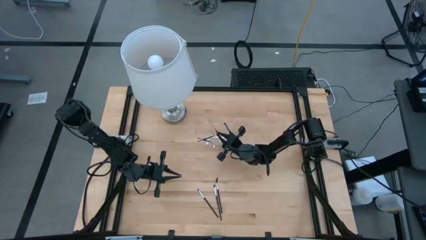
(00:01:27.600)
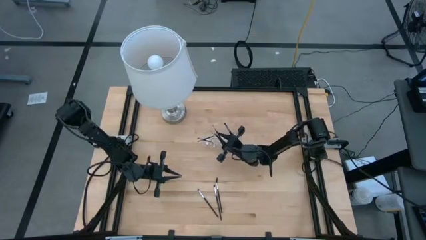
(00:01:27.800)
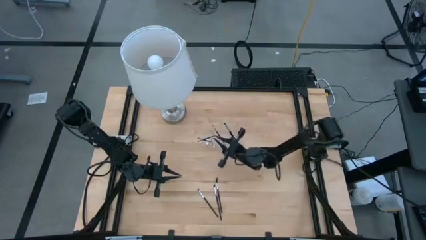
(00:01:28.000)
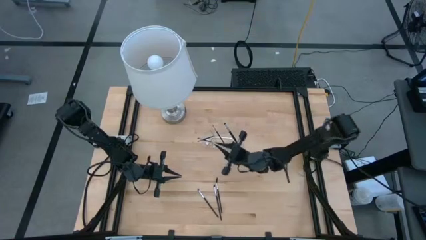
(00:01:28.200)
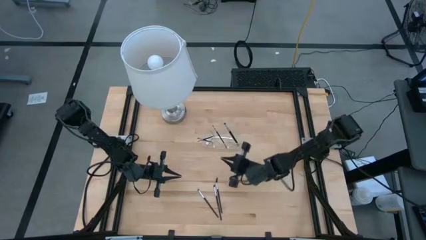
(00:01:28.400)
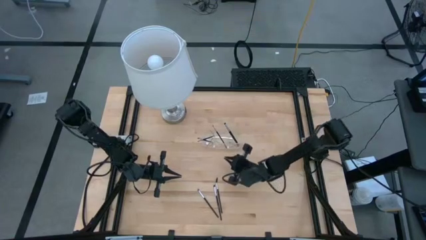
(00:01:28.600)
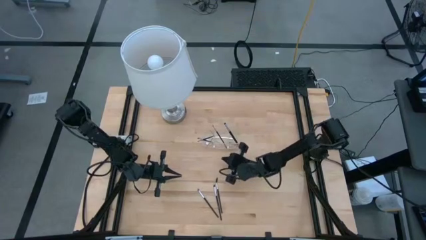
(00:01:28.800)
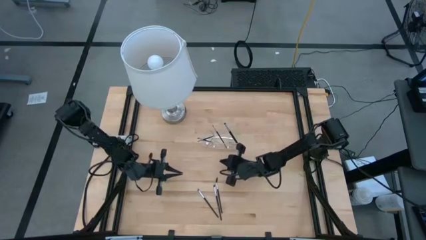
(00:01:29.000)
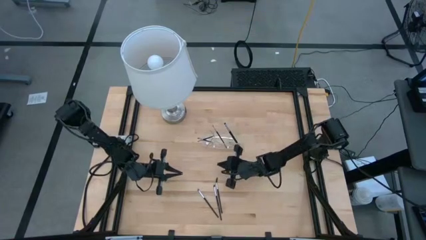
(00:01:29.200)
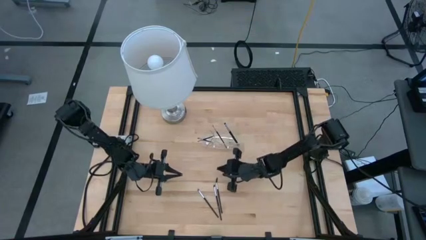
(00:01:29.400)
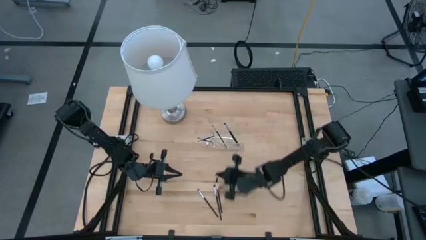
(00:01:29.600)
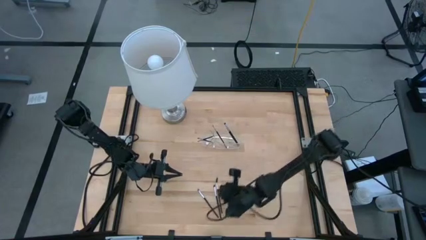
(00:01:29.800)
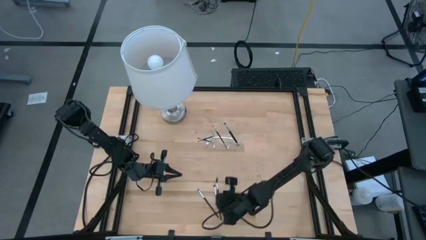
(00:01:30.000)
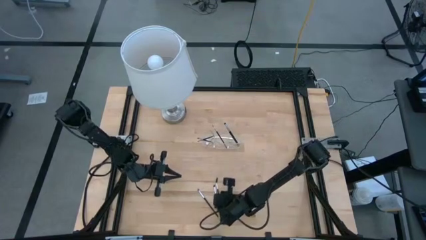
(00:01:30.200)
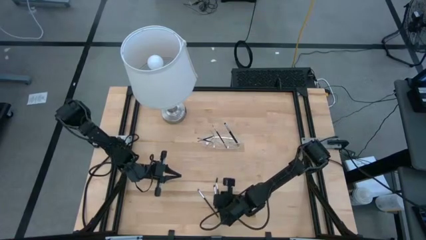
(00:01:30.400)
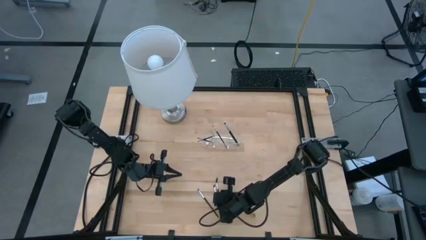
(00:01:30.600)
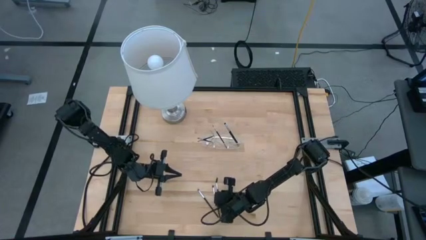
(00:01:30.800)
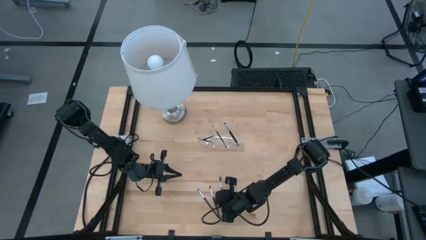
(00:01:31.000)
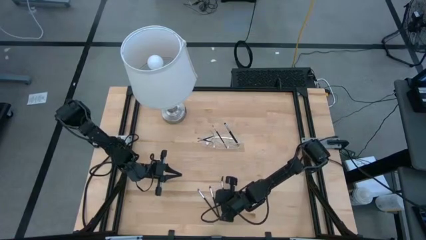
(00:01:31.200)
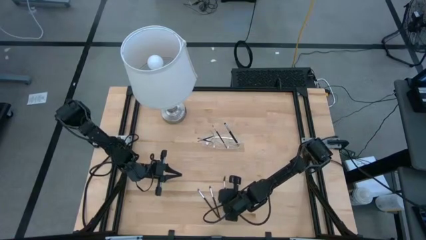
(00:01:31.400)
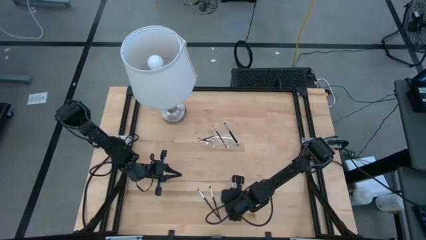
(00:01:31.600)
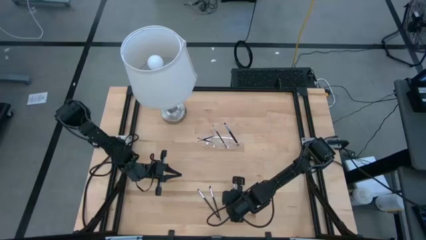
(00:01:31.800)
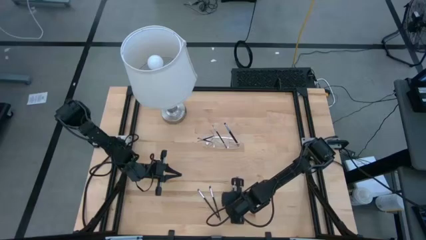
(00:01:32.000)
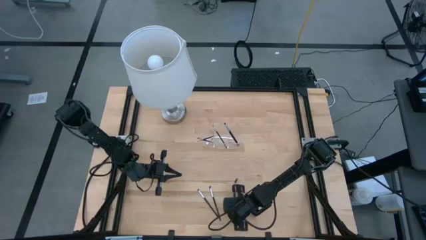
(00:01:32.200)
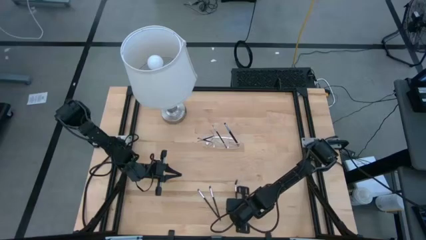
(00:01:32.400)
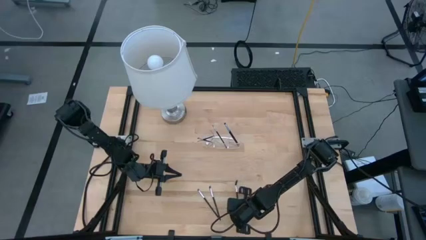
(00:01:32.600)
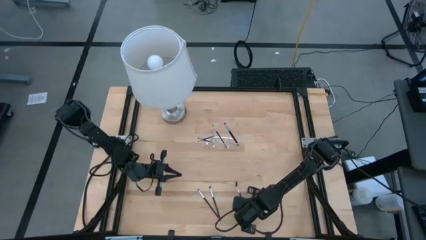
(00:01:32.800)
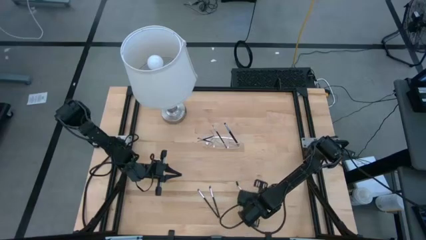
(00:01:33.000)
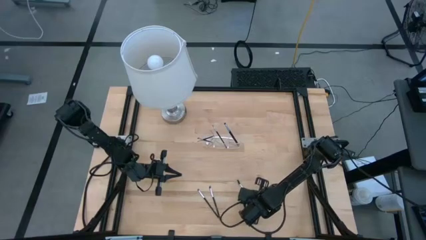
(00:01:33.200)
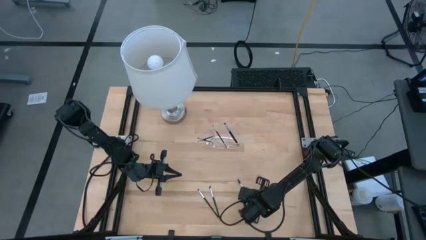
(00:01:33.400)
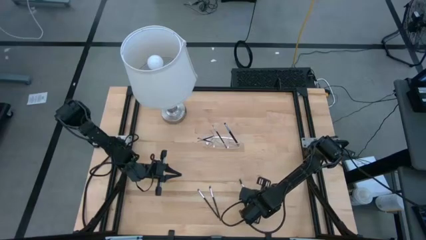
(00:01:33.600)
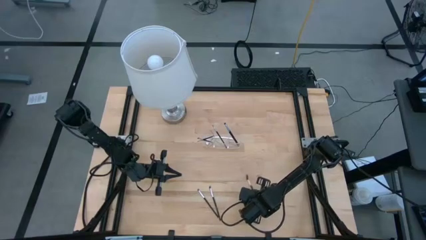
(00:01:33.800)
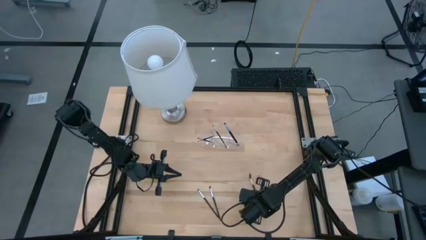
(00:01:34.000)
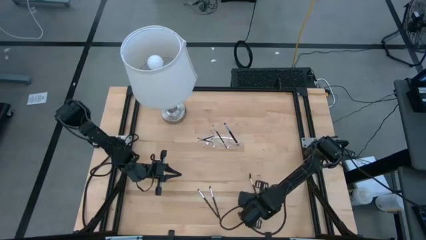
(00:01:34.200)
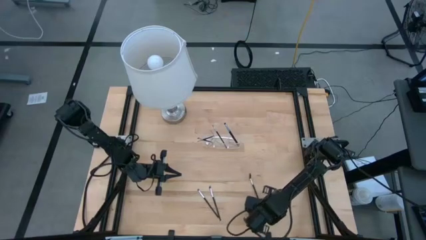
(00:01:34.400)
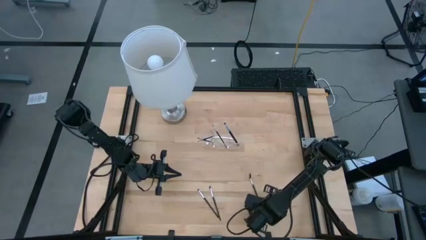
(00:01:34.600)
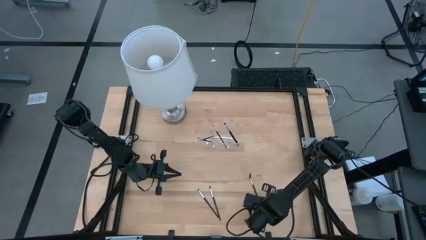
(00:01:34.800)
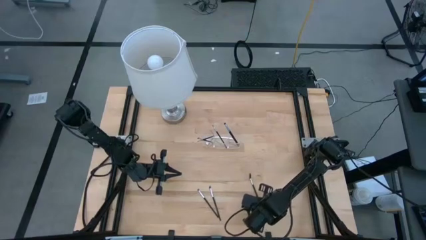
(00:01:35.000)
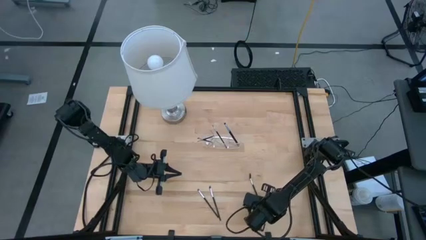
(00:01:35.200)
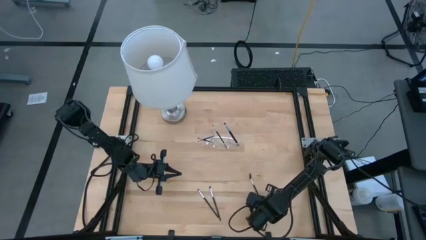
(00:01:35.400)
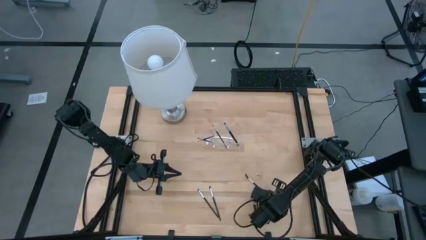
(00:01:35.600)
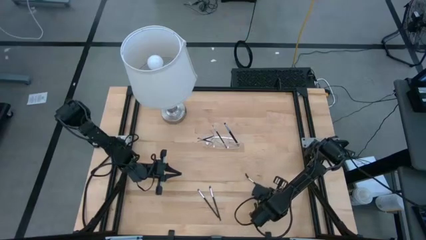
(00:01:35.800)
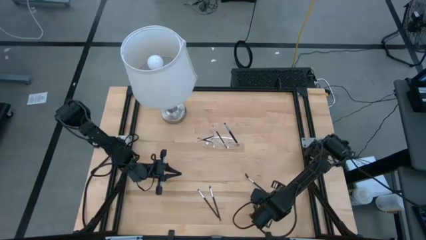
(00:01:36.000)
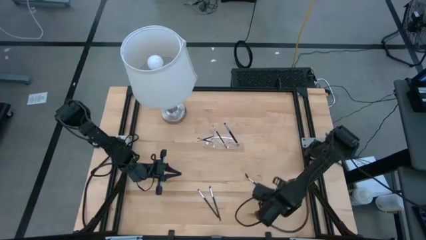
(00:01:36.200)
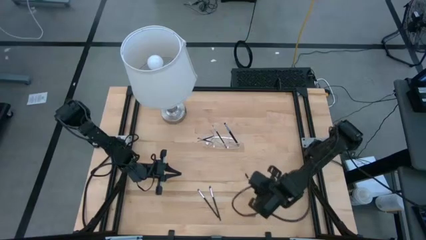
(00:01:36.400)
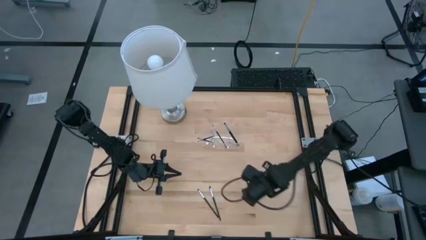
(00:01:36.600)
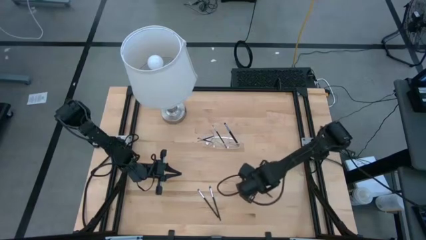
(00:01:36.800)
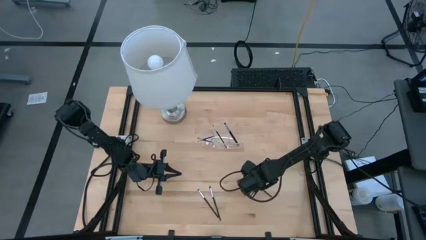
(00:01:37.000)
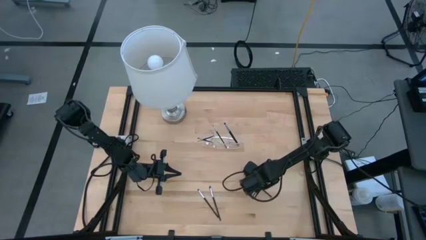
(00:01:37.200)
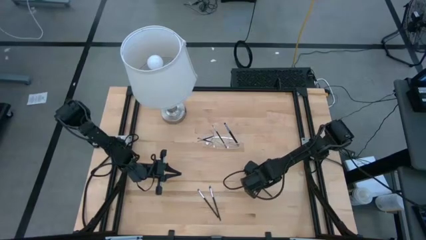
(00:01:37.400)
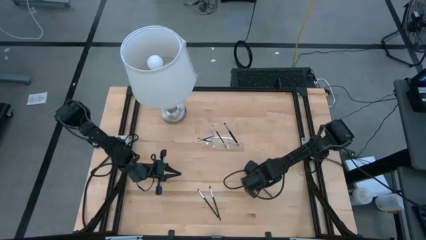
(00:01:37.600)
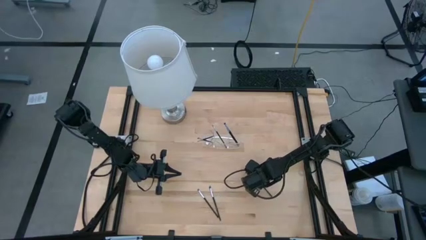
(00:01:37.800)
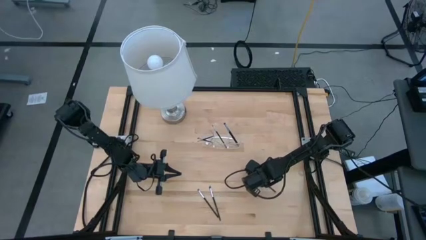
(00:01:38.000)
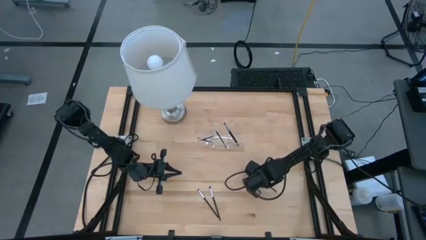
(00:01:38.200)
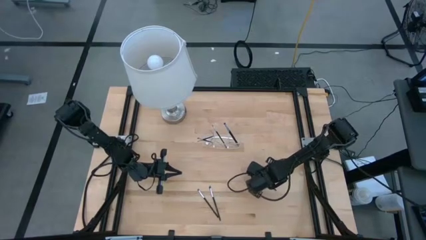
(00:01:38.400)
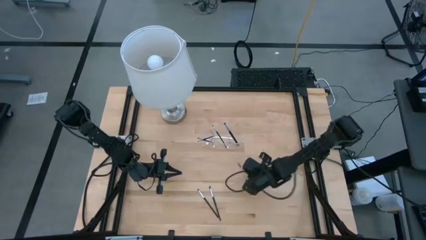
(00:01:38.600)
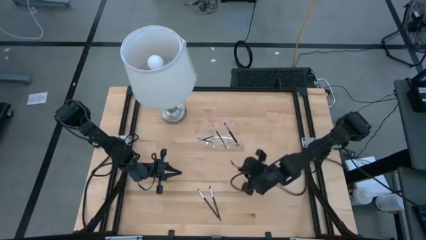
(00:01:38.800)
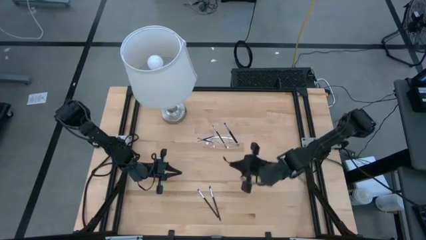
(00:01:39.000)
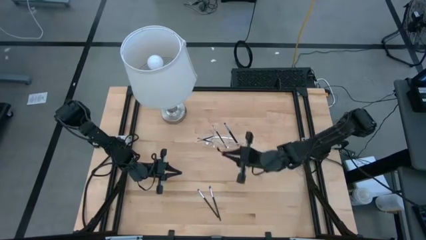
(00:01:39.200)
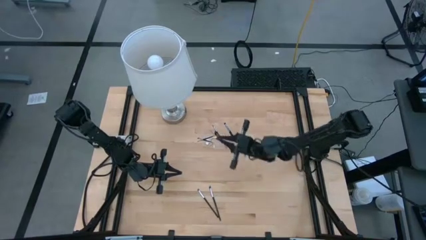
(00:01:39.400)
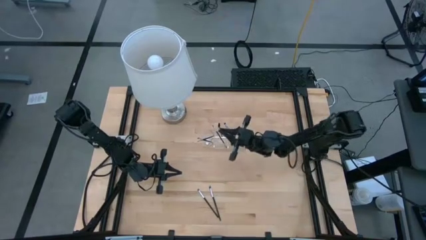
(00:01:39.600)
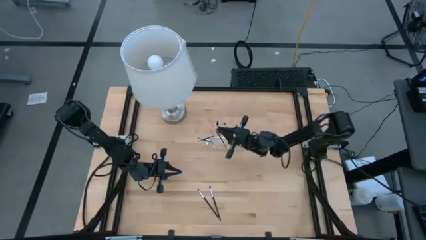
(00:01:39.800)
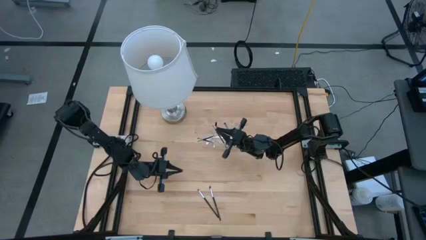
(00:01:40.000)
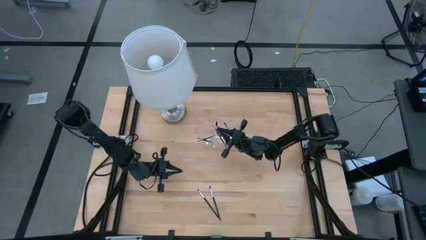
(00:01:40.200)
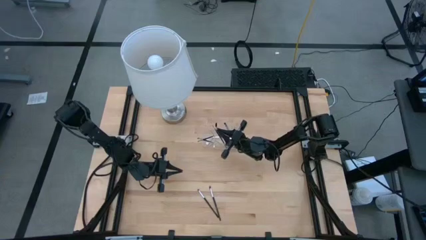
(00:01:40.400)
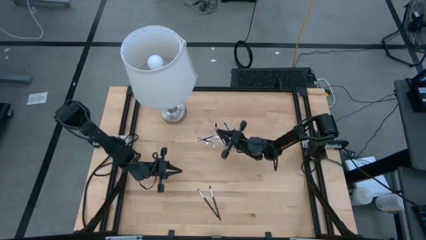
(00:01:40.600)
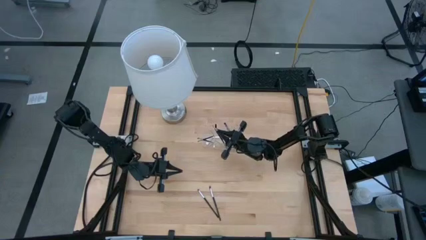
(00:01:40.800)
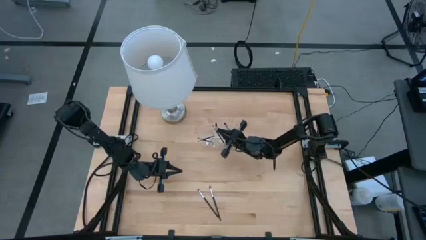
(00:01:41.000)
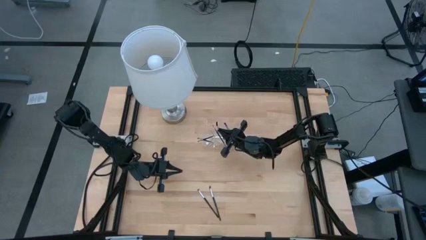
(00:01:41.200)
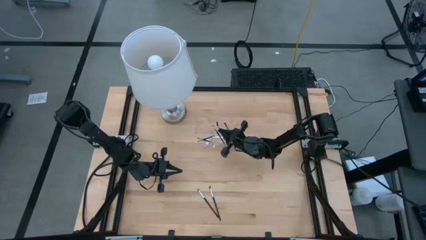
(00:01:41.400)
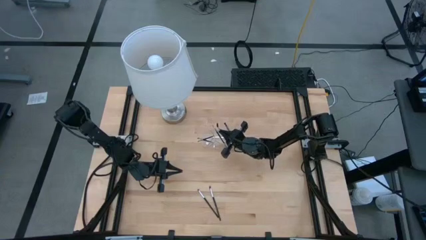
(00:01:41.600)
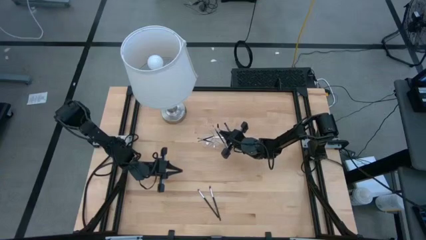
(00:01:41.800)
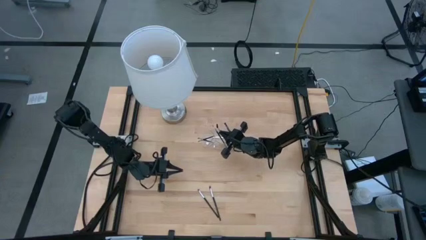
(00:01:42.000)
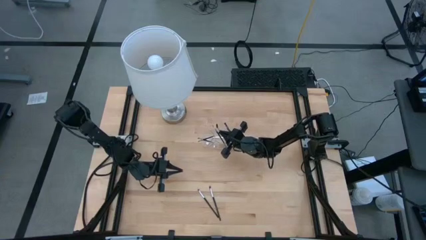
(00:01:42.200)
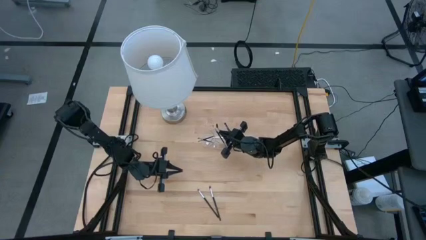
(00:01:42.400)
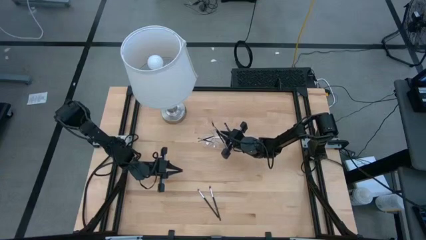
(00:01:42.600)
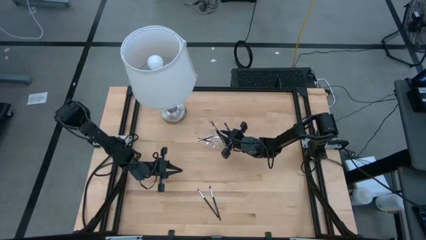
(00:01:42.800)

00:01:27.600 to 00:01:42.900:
Task: Sort items
Put the brow brush into the transparent organizer

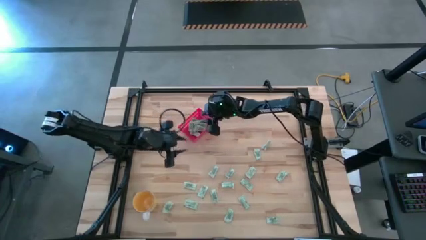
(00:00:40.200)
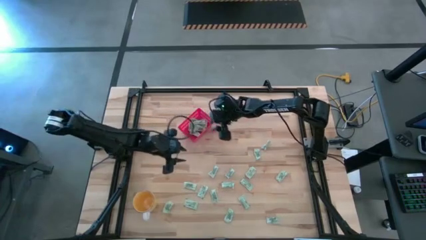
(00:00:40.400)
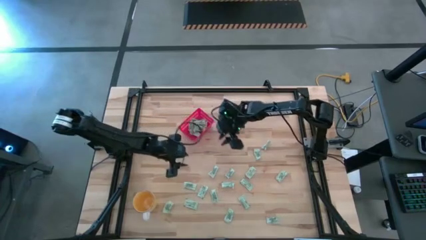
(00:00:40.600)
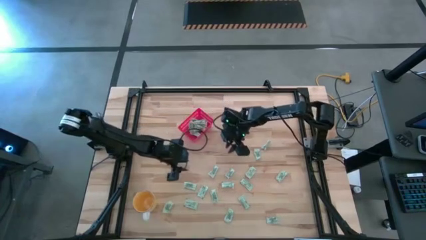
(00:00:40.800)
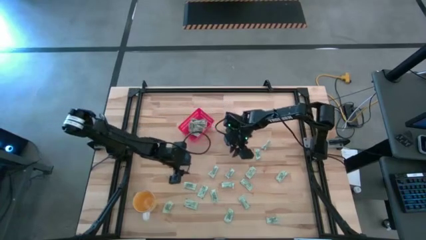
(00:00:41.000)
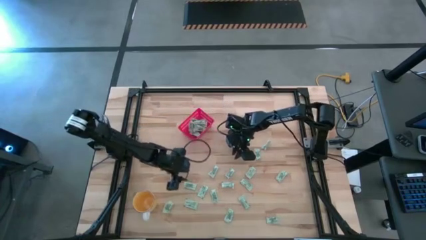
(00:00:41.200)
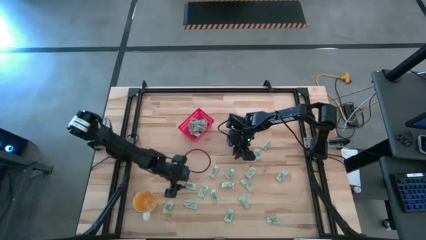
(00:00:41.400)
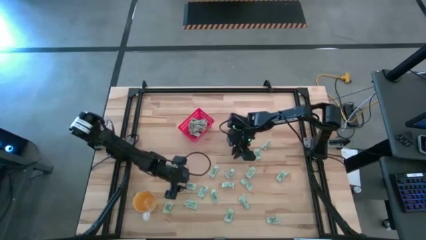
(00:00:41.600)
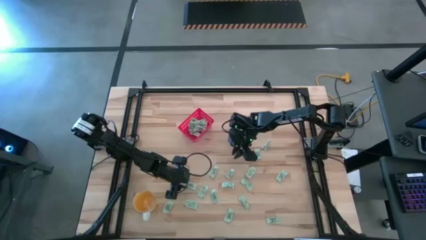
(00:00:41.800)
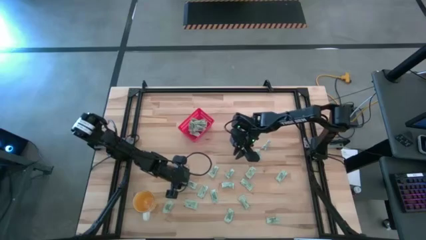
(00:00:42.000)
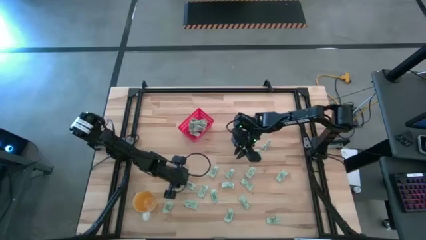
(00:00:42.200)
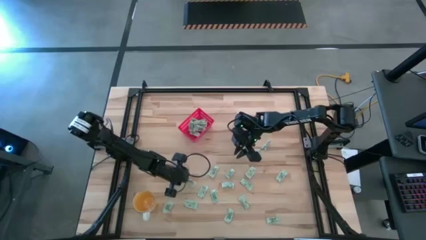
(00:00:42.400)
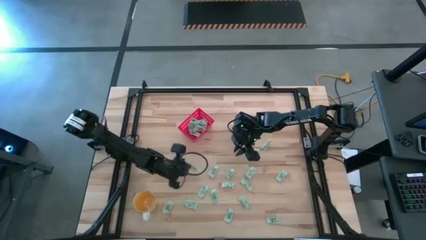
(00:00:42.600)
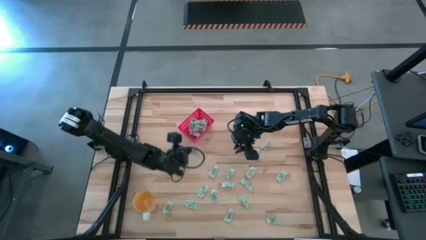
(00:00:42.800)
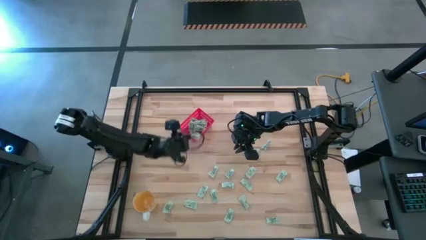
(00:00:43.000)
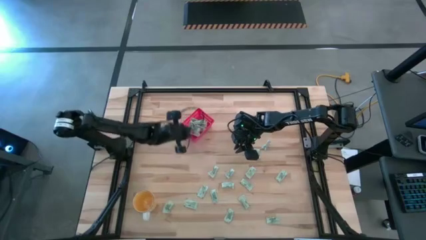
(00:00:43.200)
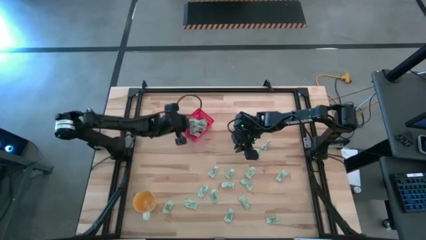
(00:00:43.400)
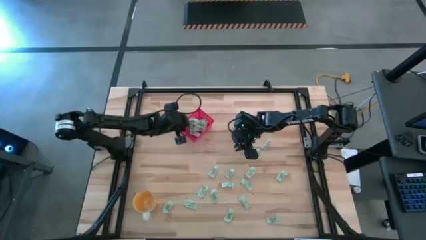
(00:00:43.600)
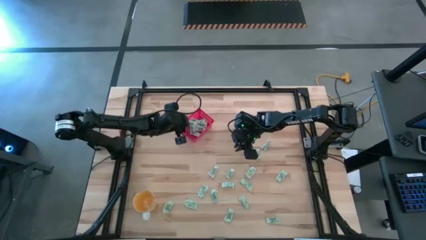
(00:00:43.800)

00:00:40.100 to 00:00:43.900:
Task: Pick and place Stevia / Truvia into bins
Put the white stevia packet into the red bin
